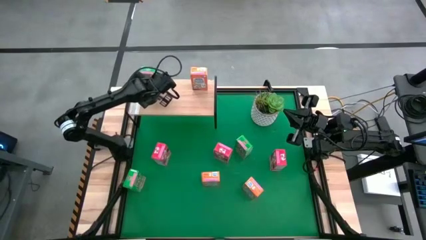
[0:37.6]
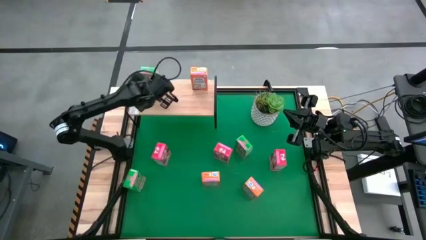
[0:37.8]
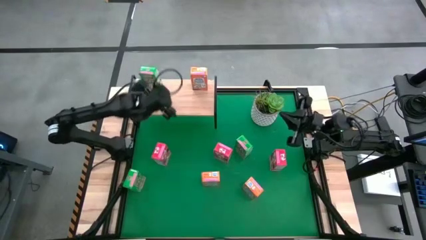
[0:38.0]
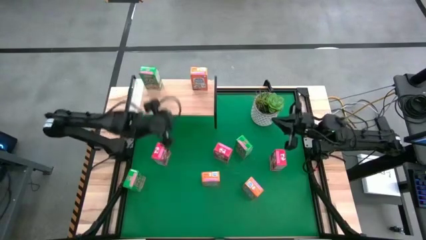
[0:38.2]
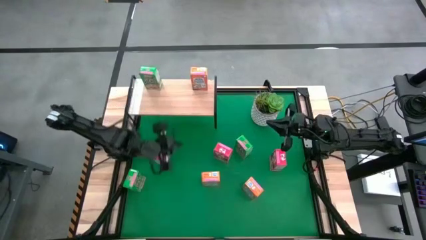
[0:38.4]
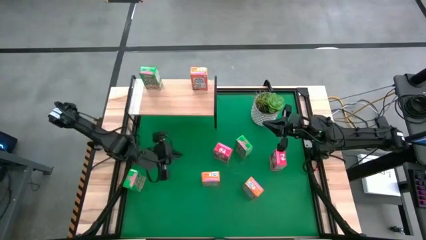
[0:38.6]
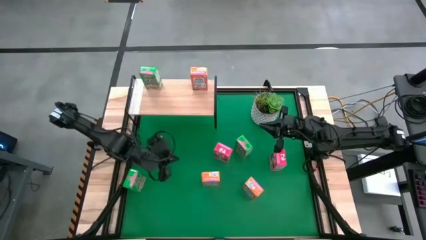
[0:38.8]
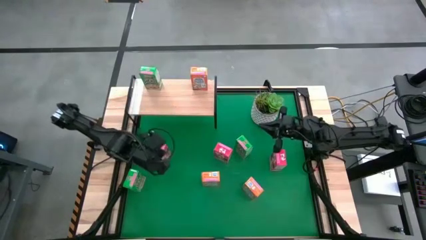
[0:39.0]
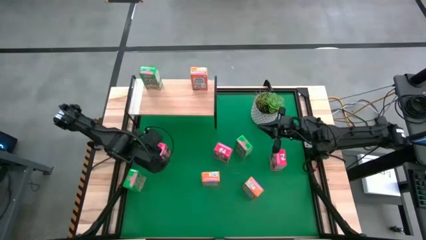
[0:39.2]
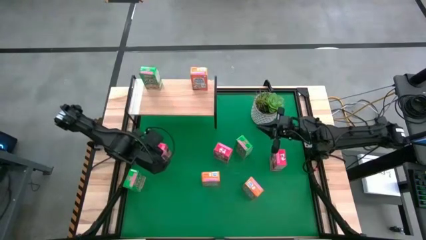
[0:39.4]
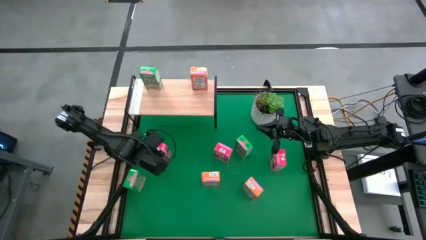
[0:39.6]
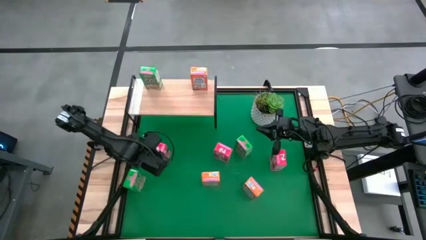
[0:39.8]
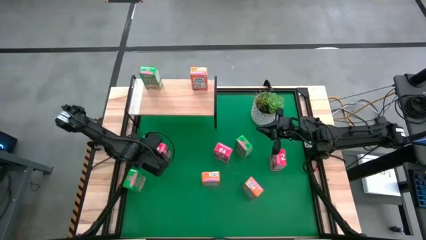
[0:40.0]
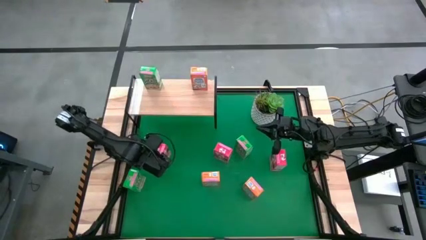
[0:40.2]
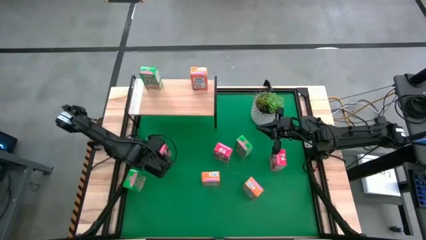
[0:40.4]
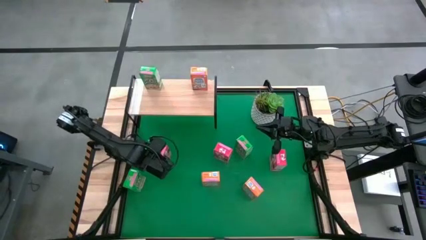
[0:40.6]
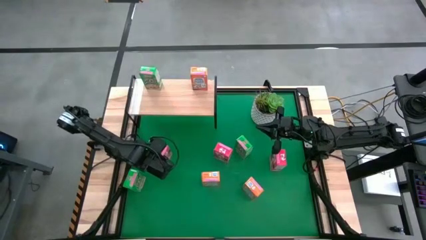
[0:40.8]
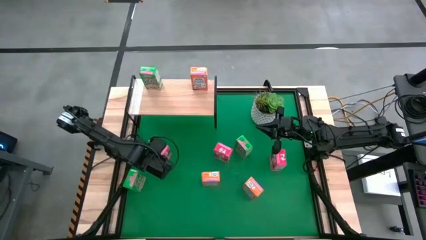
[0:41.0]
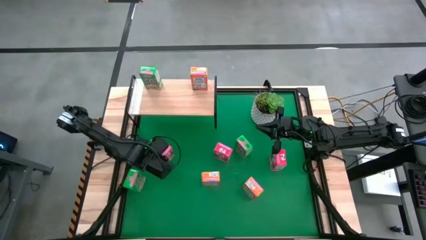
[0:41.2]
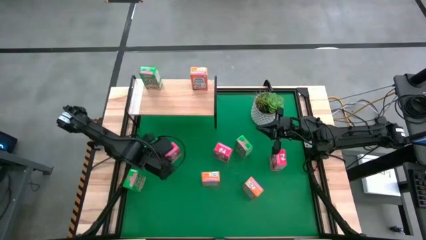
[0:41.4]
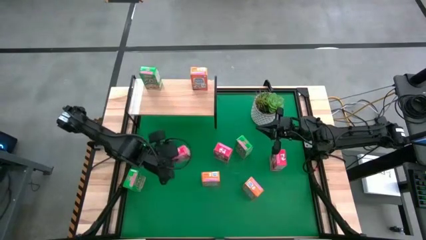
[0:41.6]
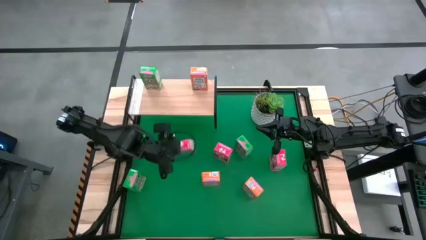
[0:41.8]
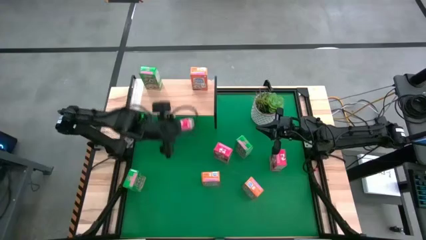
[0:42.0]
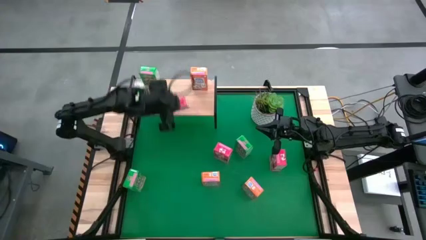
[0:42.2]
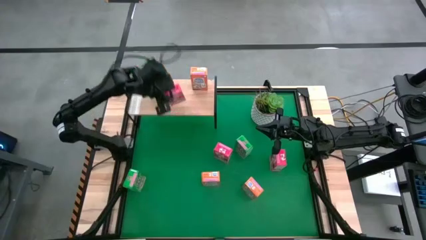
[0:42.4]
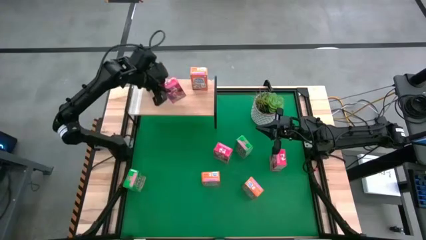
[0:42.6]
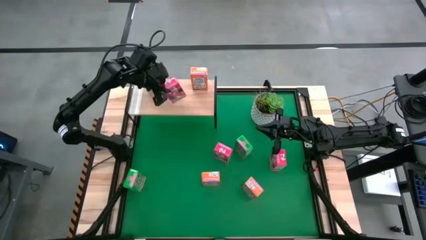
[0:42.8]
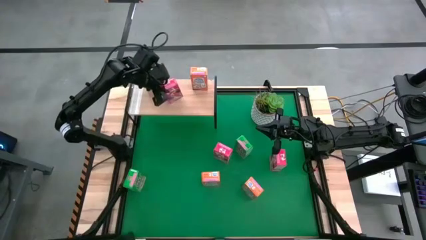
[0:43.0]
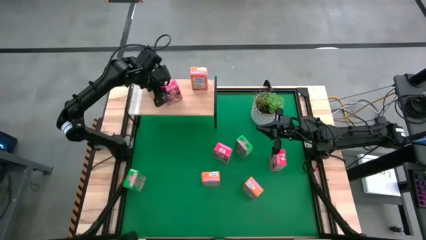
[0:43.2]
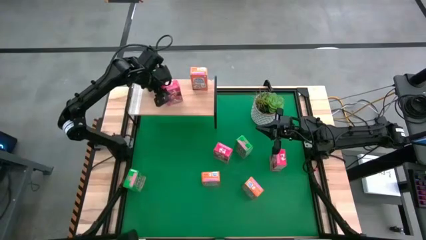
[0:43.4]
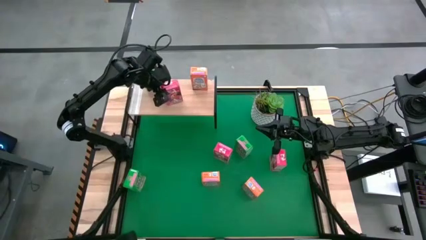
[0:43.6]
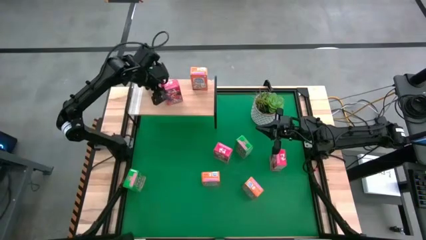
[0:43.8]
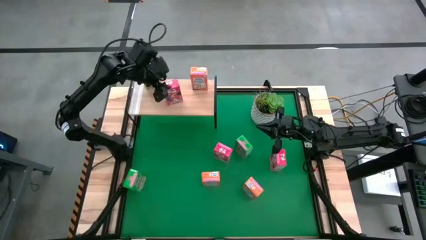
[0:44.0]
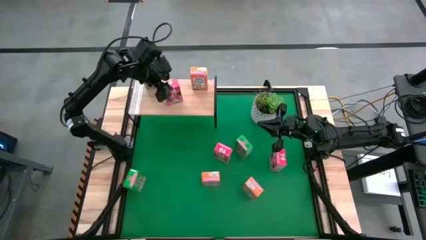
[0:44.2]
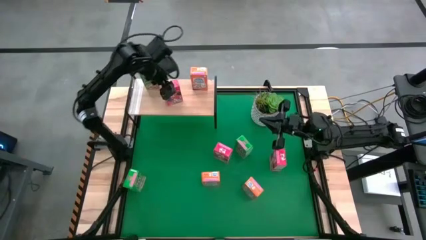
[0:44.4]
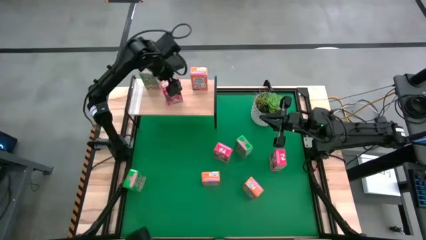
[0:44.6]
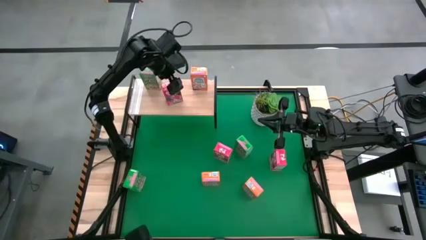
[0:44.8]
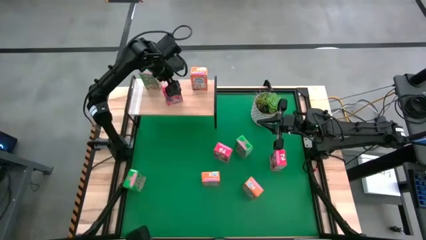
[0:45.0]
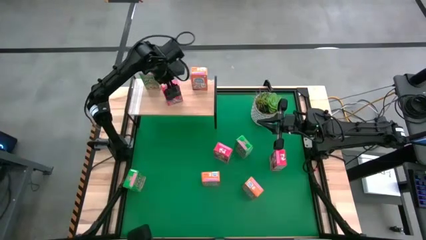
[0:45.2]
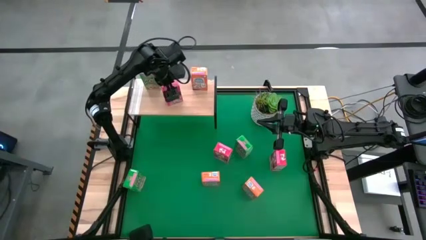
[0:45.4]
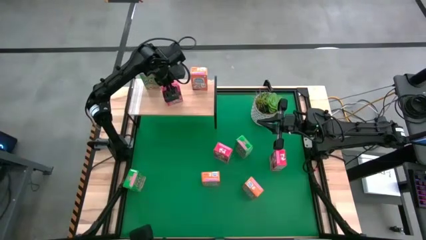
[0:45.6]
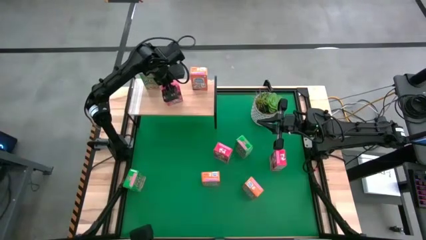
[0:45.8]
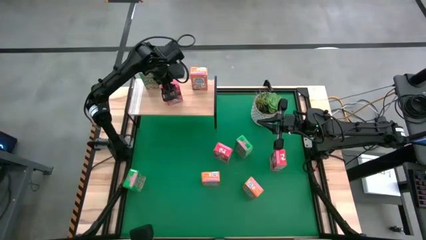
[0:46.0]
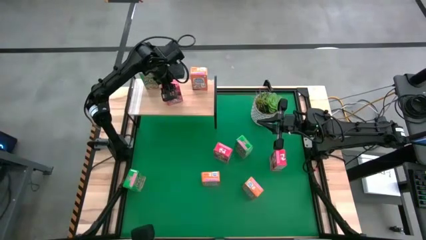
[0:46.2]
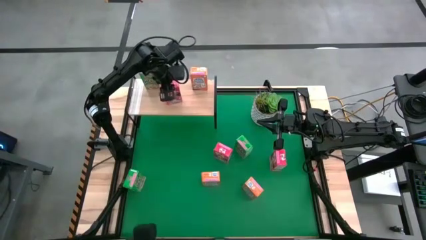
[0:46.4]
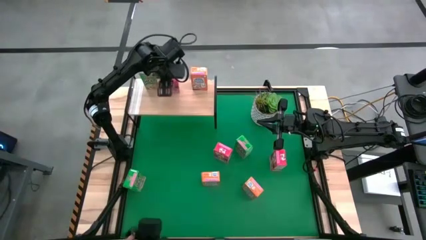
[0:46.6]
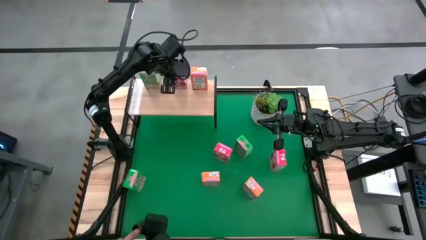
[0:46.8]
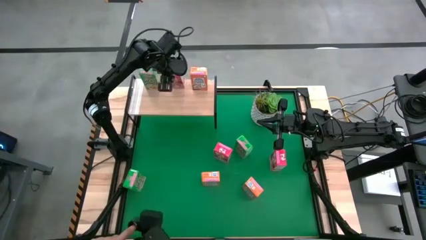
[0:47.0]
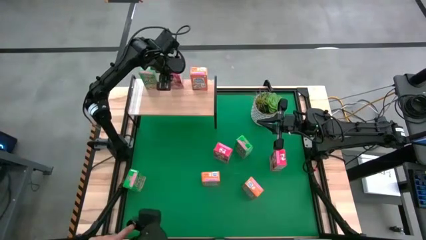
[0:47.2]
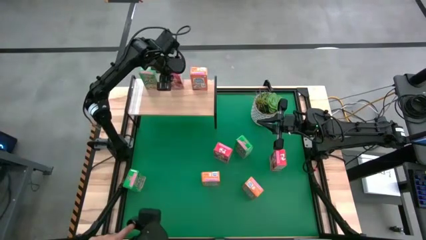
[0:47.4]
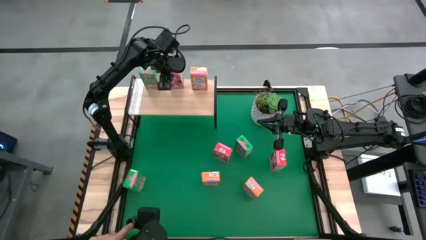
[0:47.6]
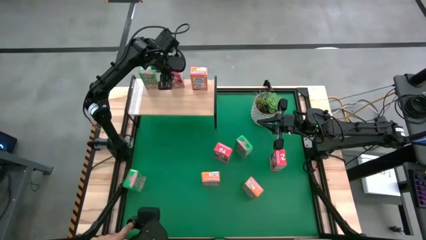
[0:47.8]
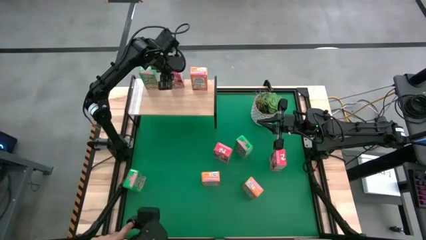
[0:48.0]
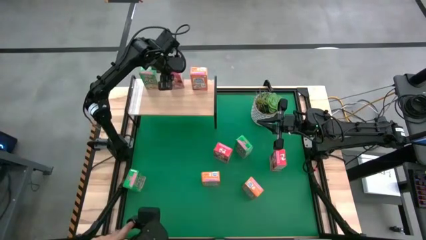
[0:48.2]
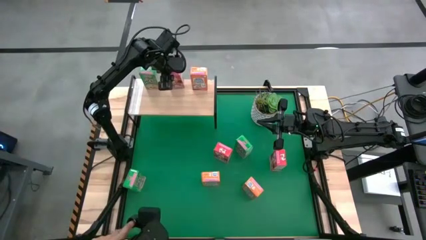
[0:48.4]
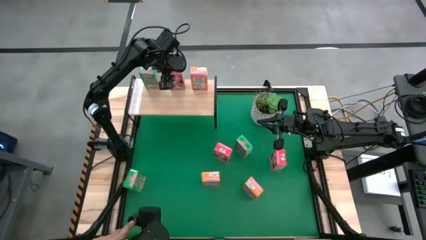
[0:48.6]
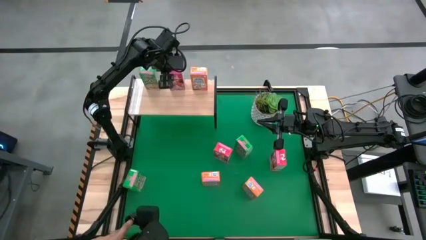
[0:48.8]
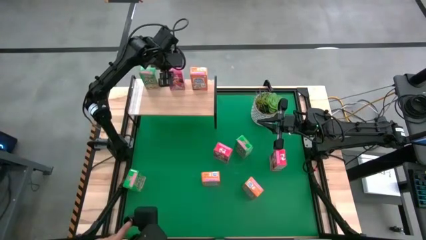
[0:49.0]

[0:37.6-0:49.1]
Task: Stack cereal on shelf
Put the left red cereal box on the shelf

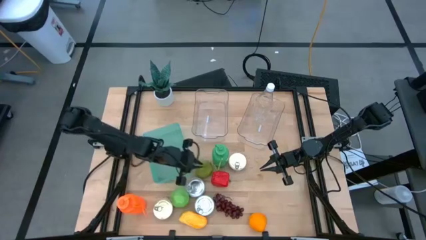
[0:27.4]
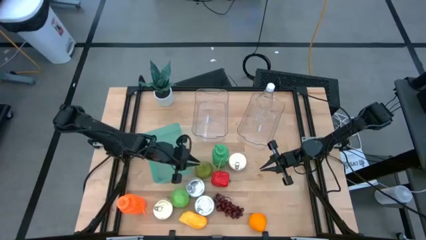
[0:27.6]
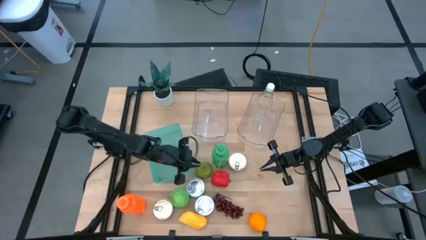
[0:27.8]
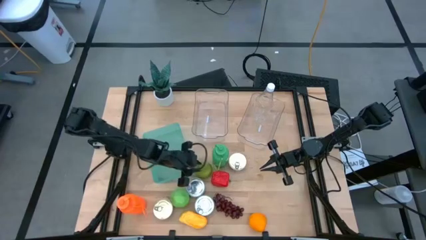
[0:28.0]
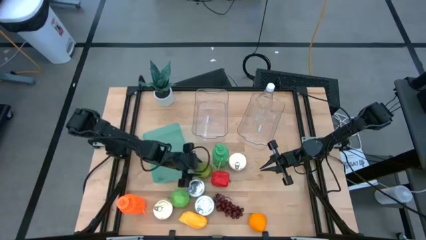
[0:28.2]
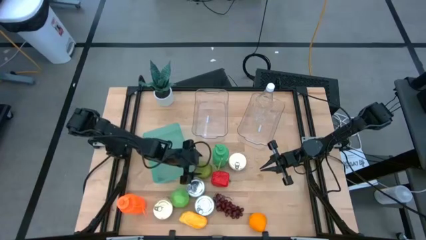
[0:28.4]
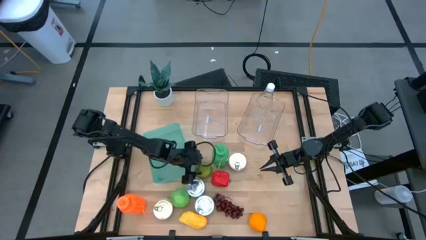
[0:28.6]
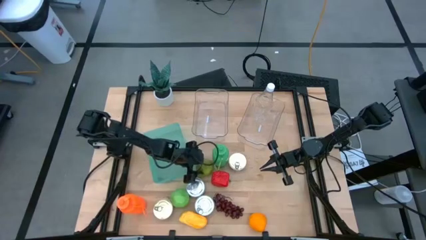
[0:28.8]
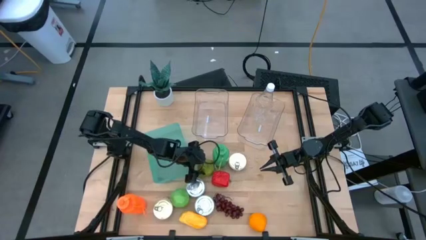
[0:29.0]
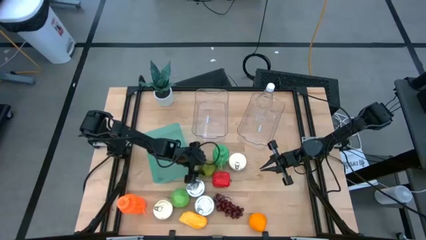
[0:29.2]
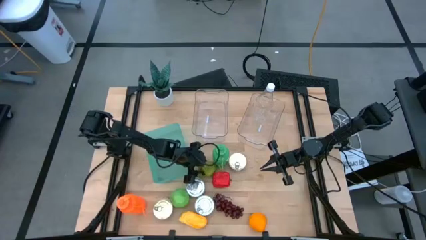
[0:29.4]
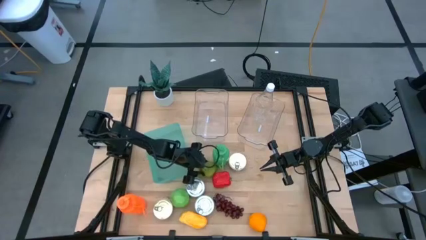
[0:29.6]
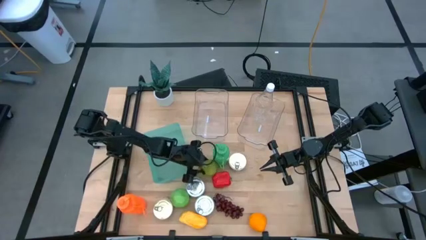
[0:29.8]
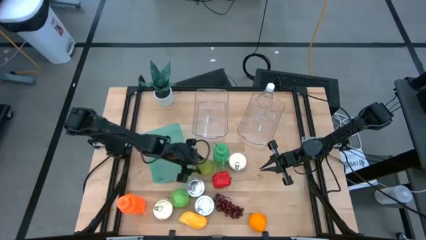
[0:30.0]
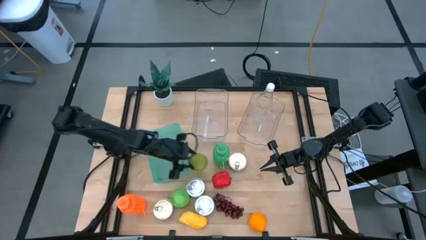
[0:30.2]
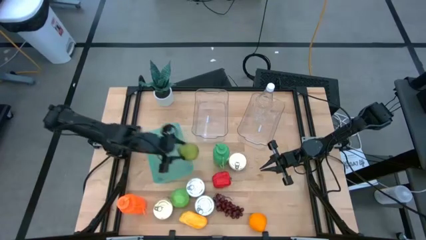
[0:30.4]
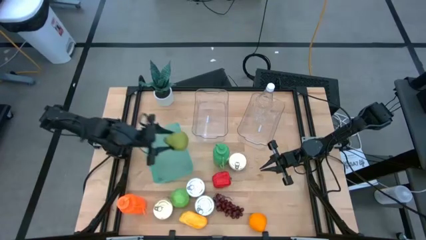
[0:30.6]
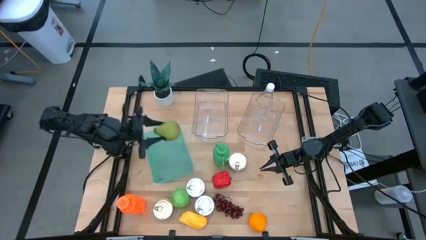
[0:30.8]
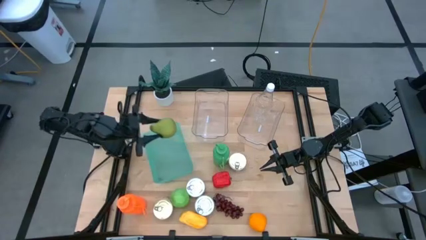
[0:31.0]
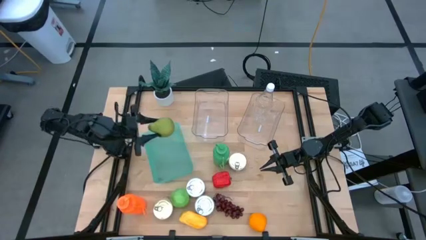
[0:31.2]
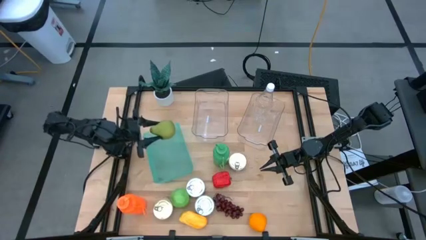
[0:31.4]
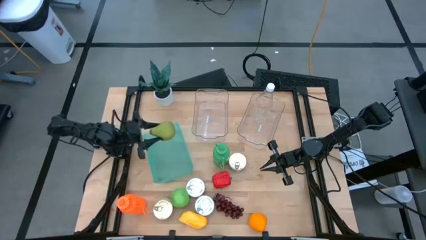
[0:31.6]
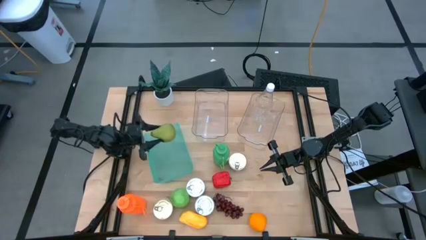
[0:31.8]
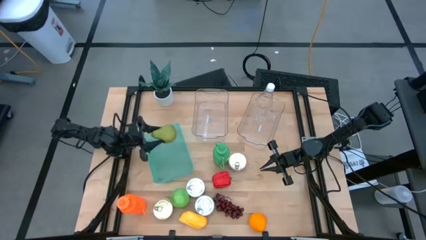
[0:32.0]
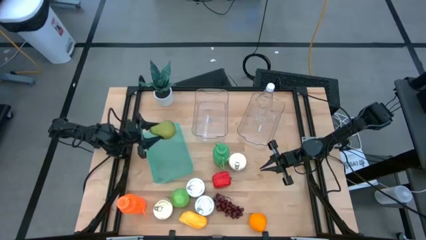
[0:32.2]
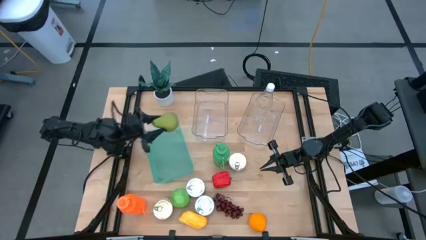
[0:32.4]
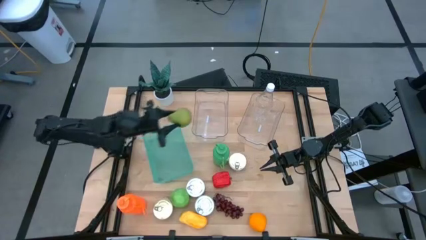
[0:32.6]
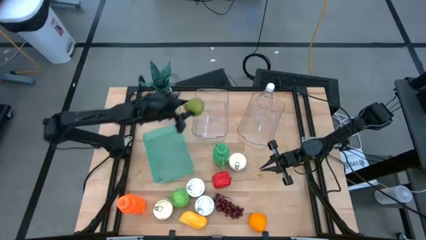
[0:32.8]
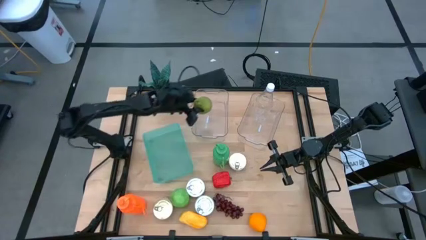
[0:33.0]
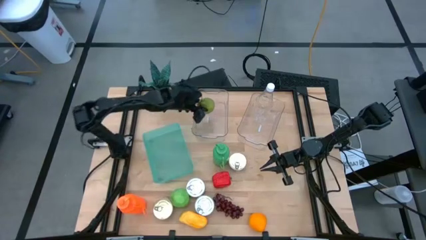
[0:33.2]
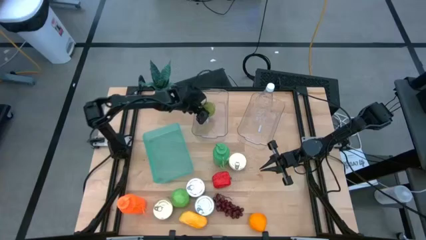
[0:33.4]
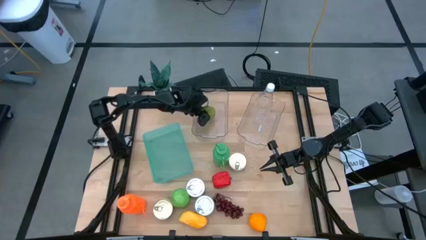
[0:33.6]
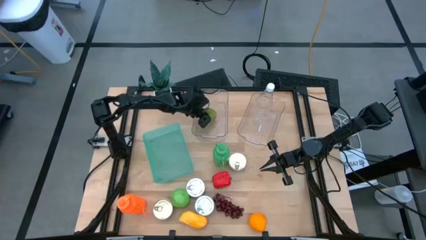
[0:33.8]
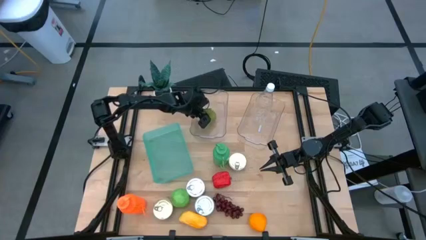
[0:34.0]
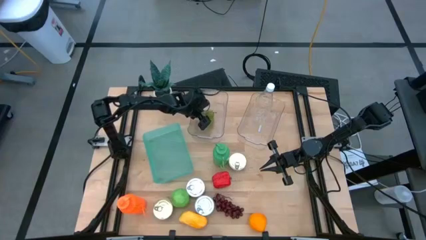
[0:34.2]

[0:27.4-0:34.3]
Task: Pick & Place Food Item
Put the pear into the left transparent bin
